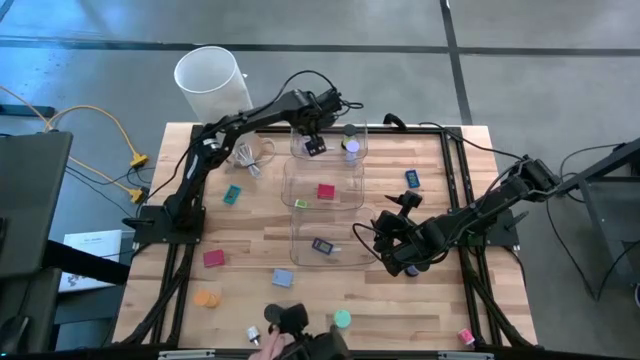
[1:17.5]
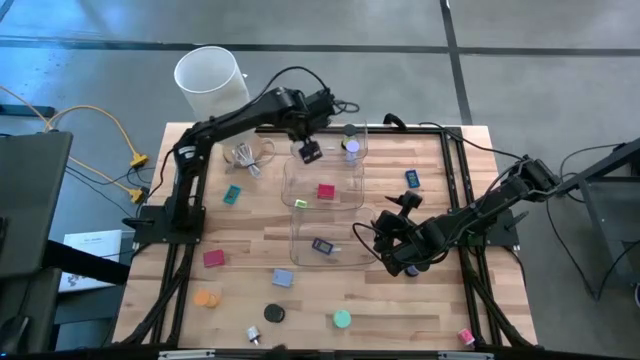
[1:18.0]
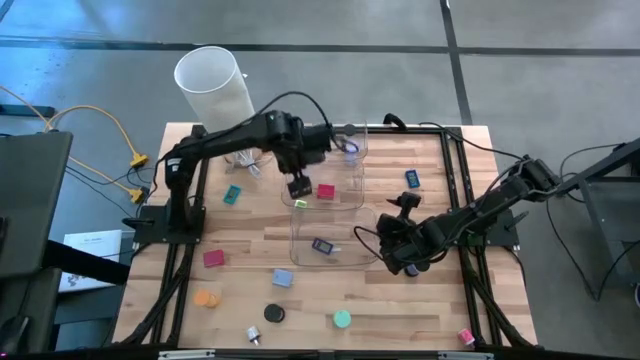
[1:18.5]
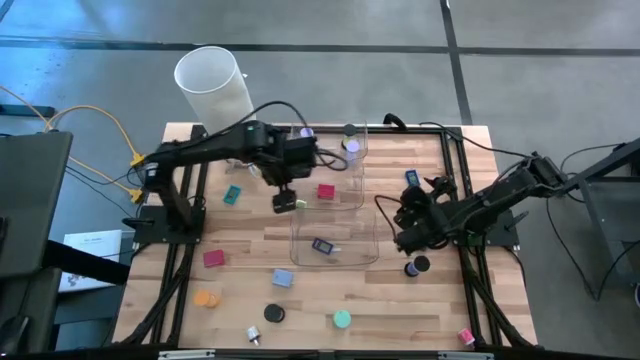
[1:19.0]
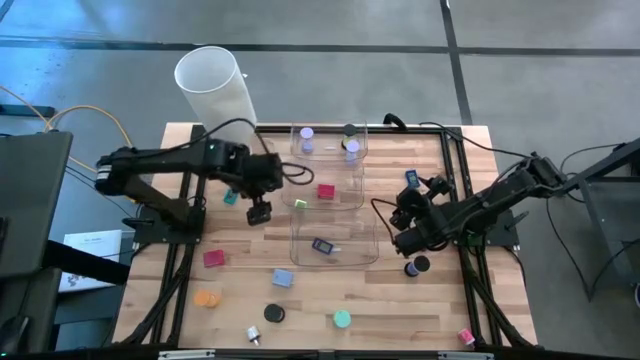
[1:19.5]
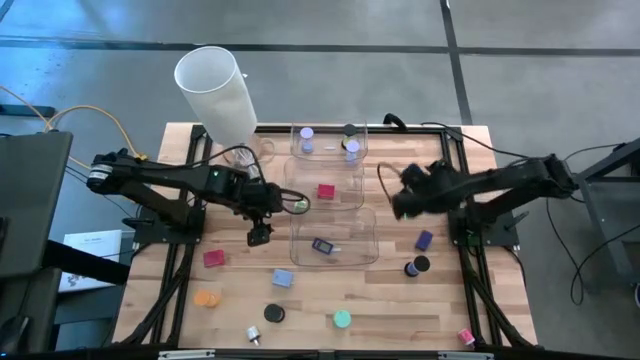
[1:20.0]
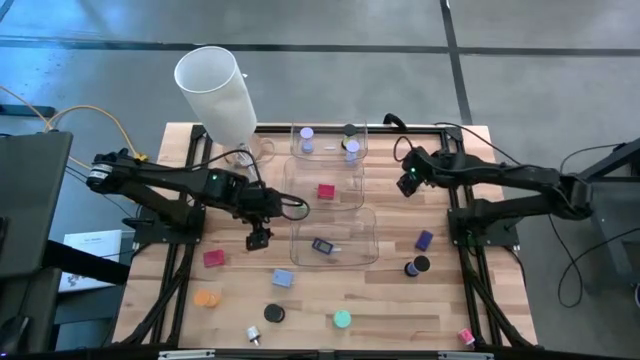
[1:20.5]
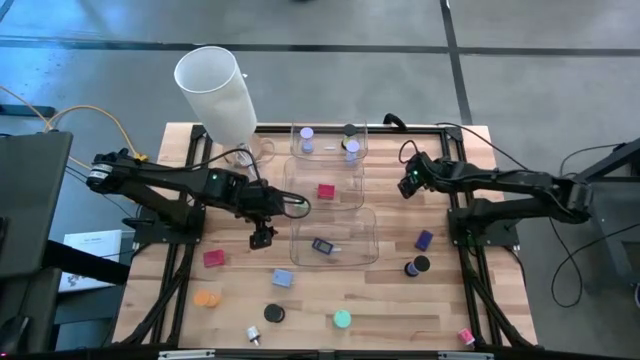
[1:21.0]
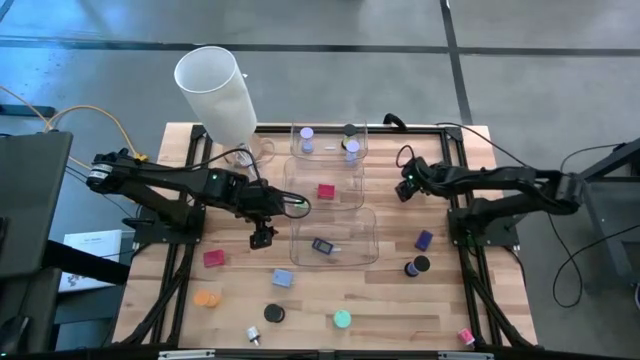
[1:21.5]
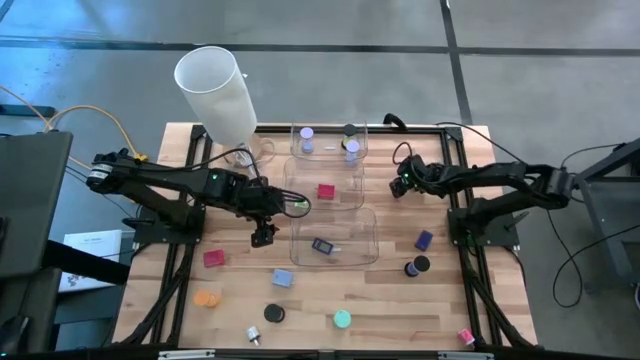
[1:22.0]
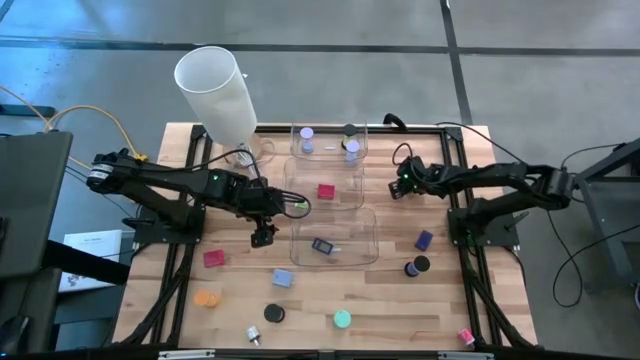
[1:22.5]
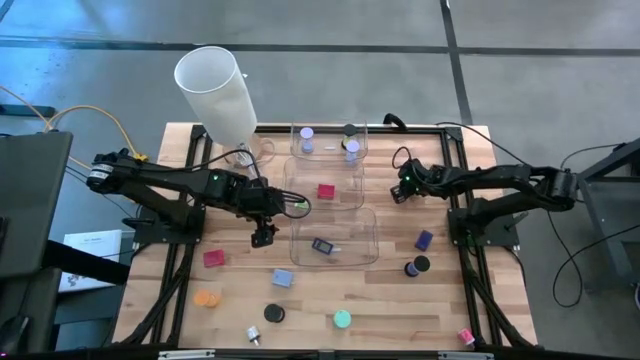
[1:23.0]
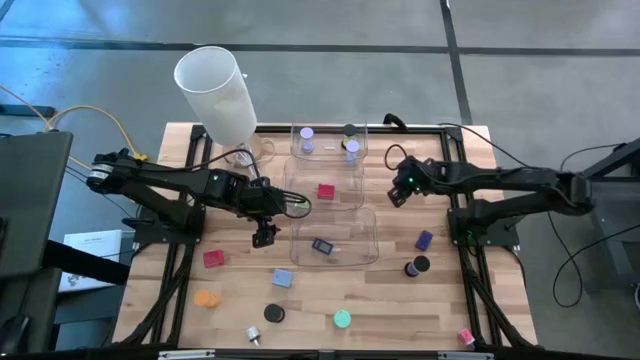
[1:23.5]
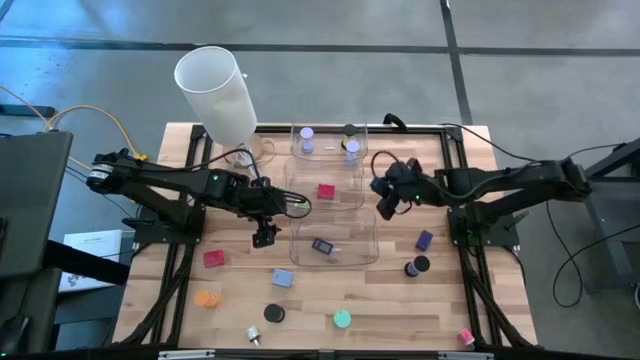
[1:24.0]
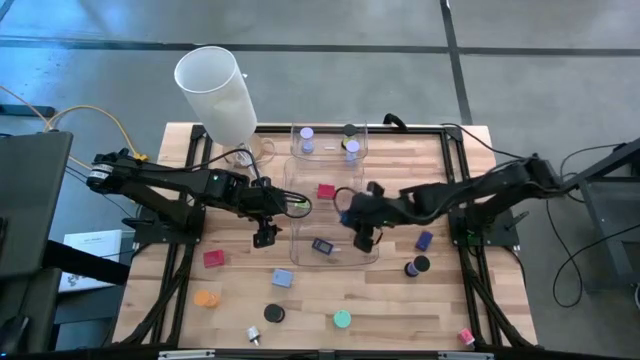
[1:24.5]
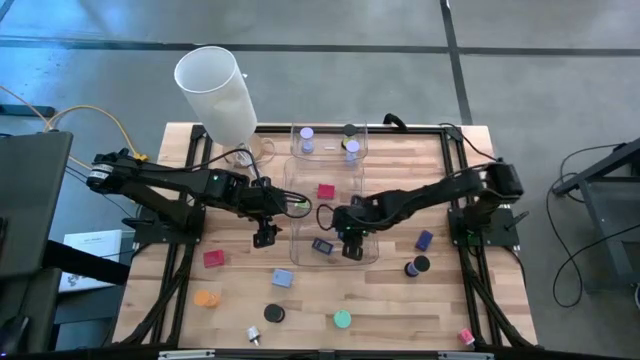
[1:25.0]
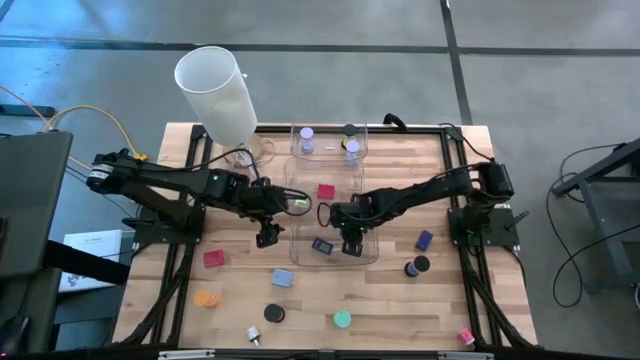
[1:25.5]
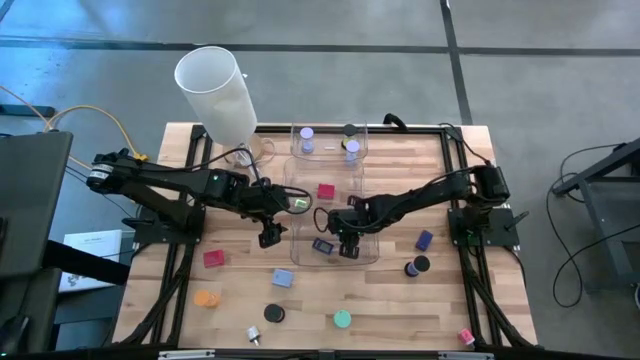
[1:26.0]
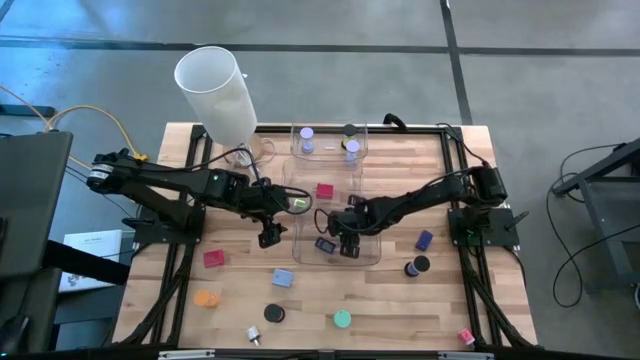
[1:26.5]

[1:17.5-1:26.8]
Task: Pick & Place Office items
Put the blue digital timer into the bottom transparent bin

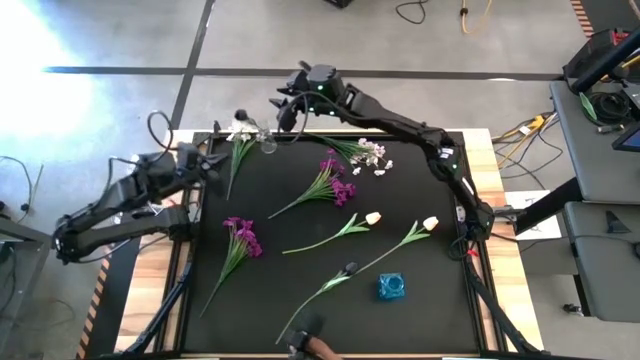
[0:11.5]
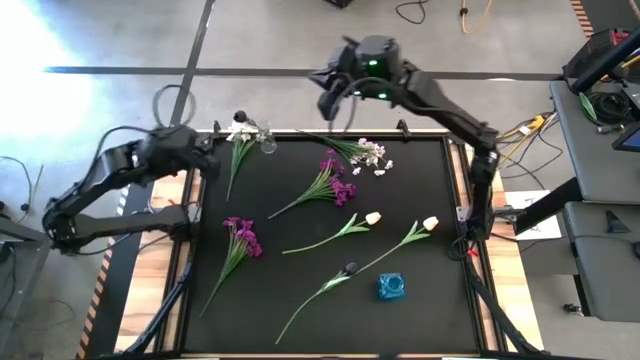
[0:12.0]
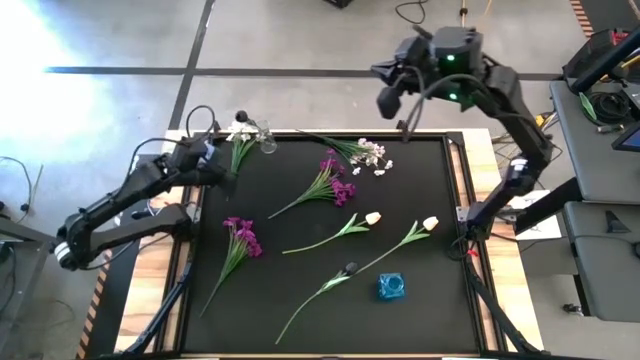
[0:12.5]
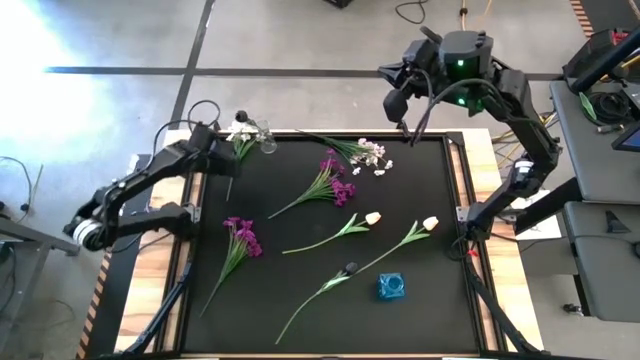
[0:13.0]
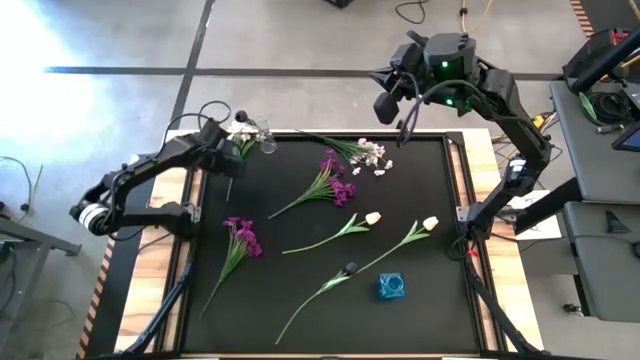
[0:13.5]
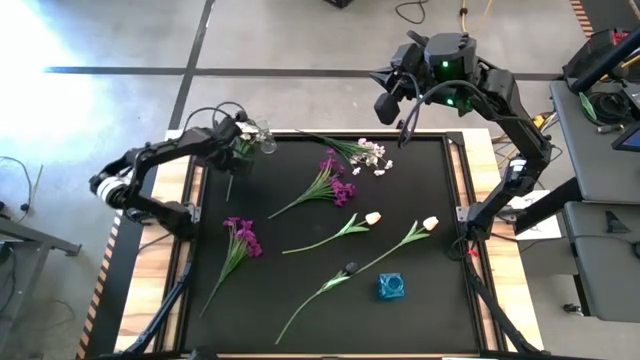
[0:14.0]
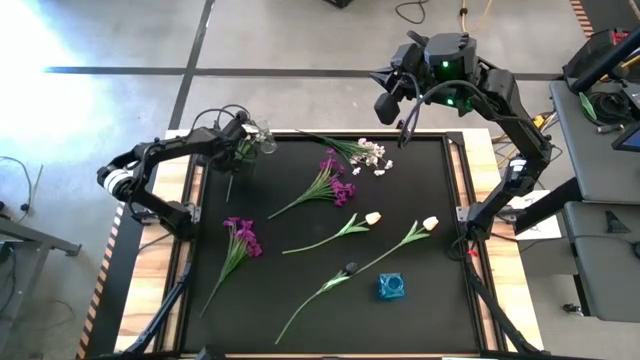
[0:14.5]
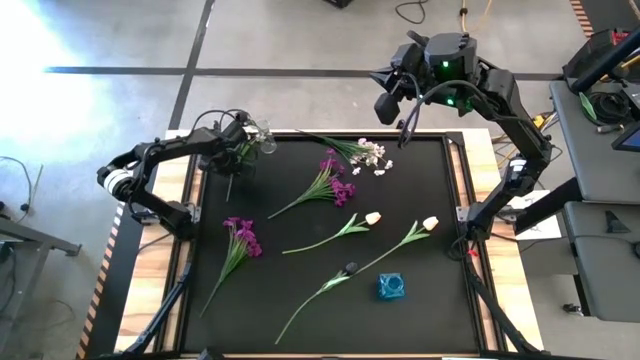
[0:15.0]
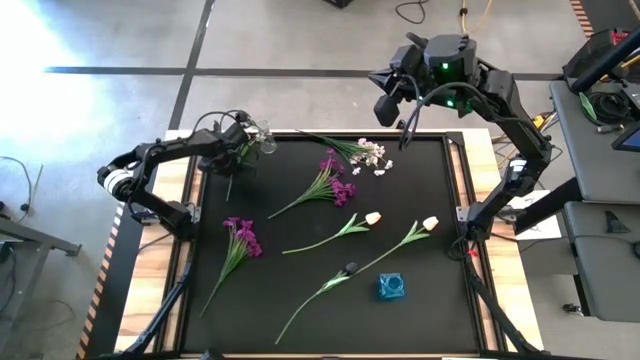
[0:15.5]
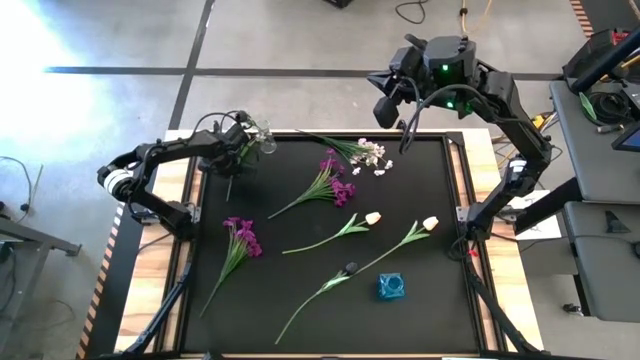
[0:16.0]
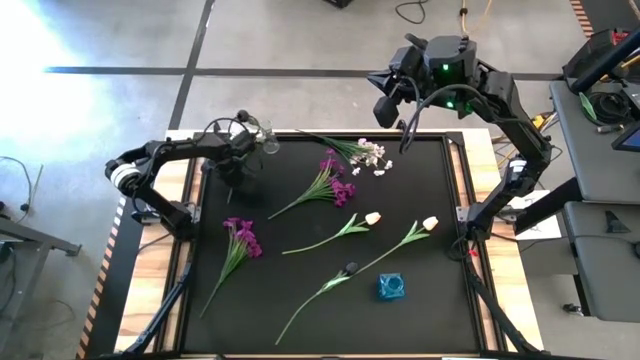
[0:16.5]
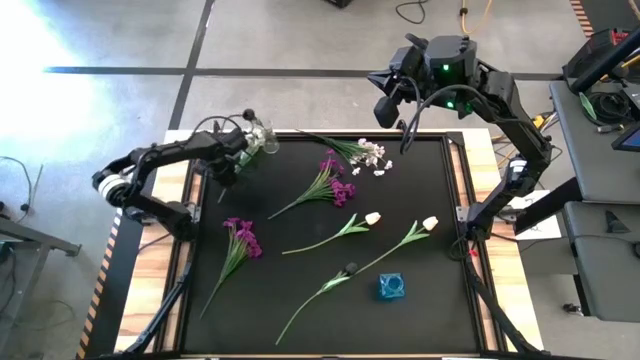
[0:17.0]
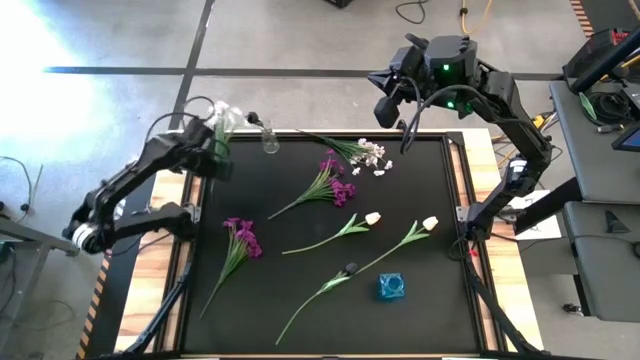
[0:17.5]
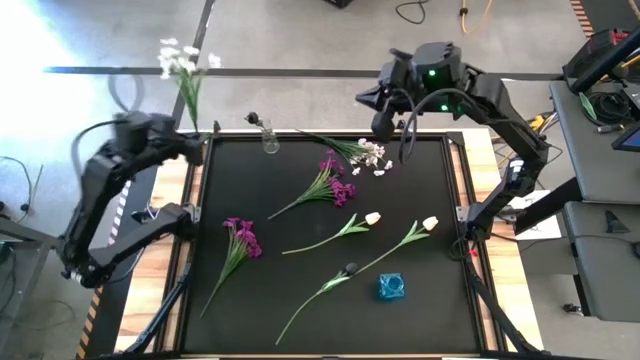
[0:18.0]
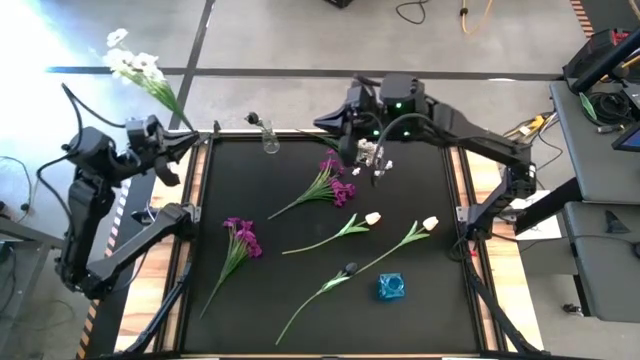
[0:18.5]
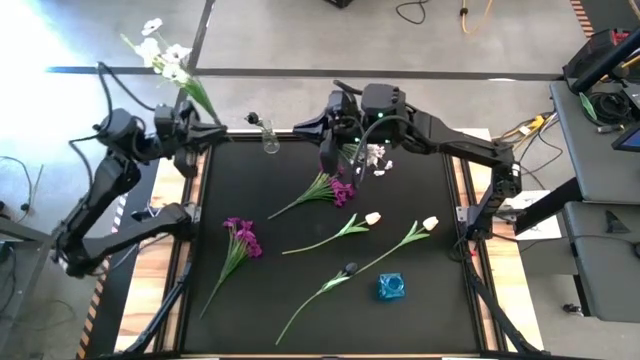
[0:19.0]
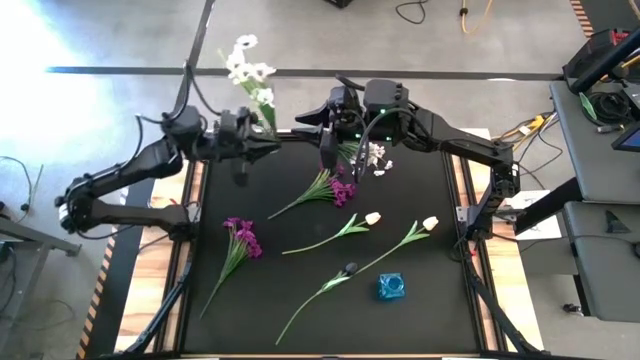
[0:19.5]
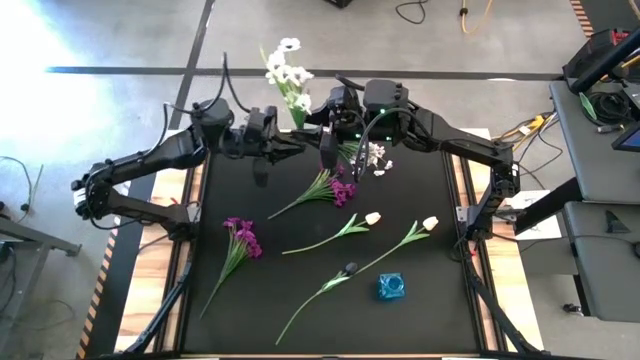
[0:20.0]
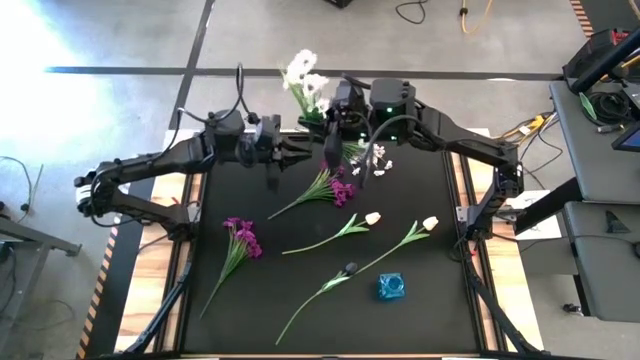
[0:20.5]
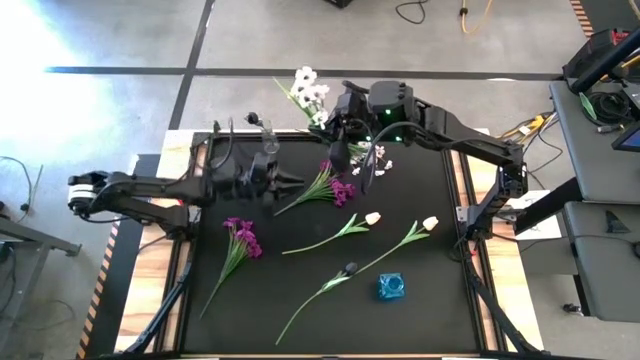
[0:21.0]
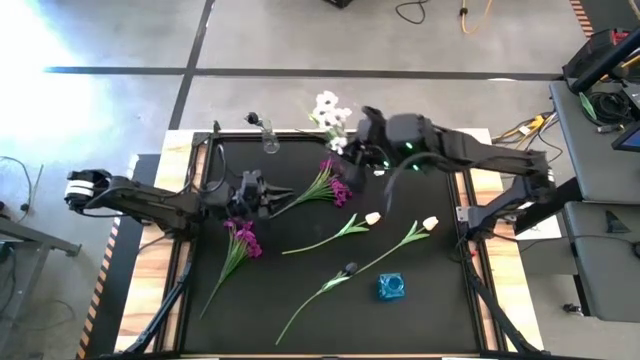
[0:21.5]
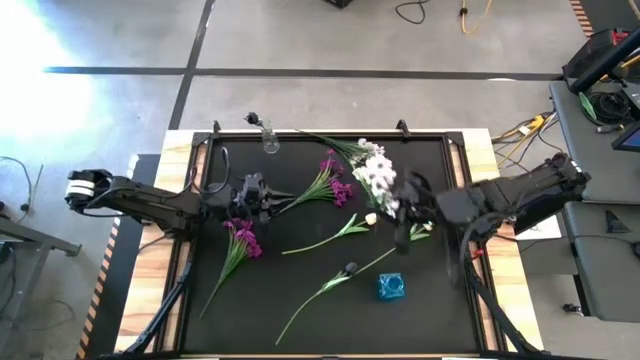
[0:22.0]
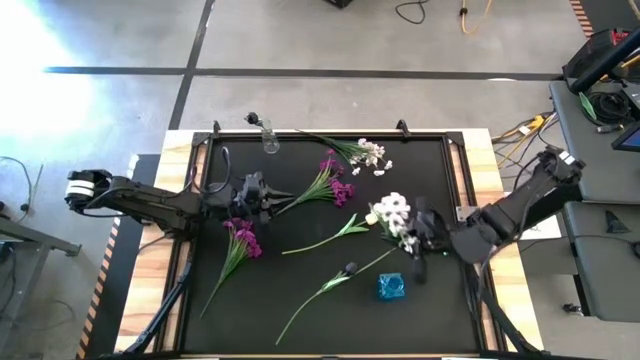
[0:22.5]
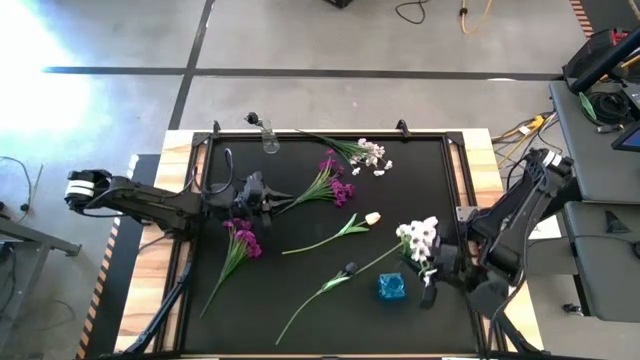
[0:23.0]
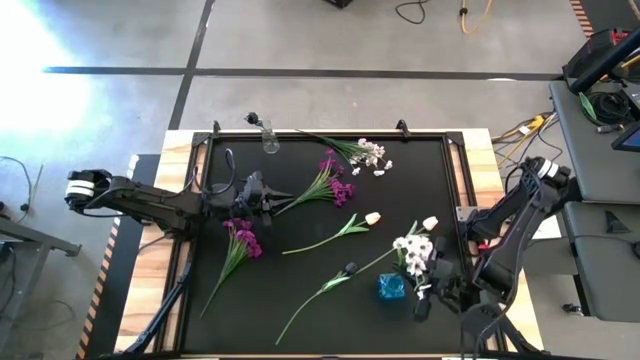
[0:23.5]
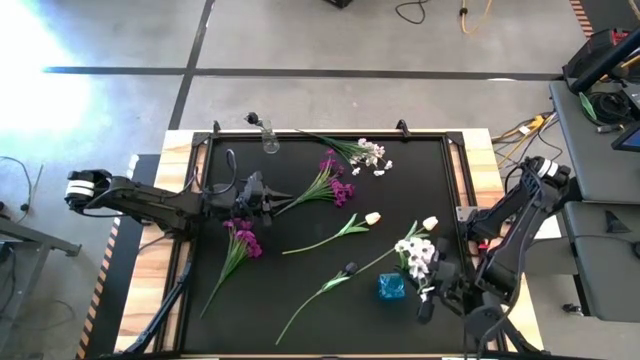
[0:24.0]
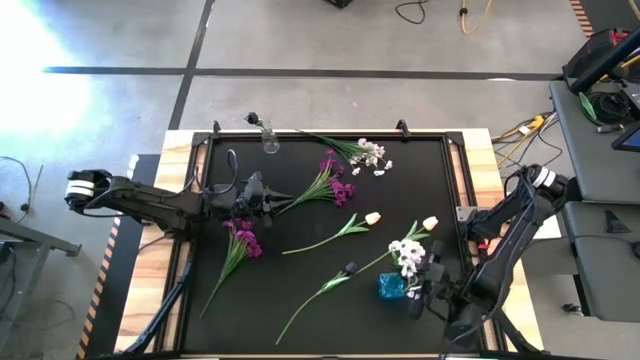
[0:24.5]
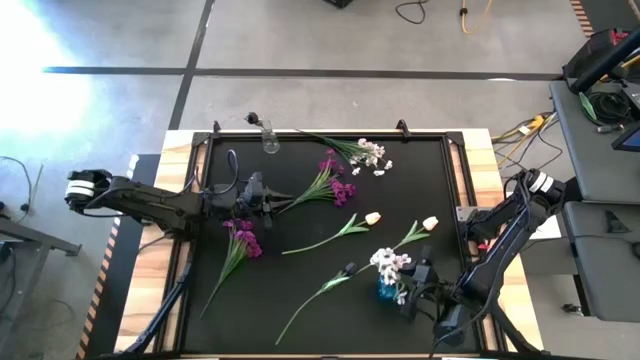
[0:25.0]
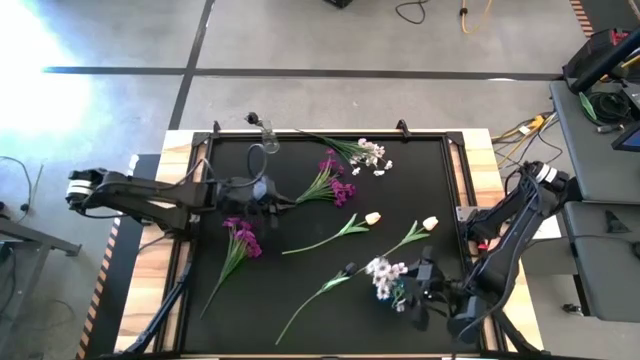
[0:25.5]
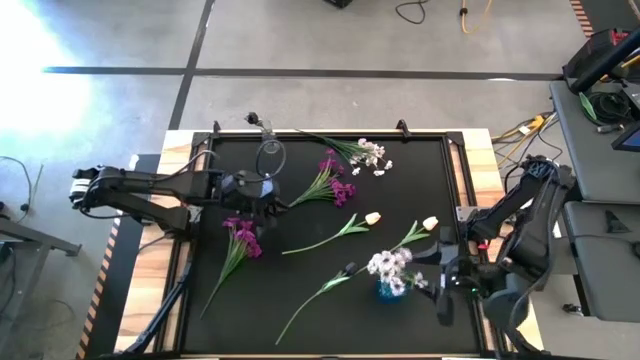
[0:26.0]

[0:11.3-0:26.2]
Task: Sort flowers into vase by color
Put the left white flowers into the blue vase
